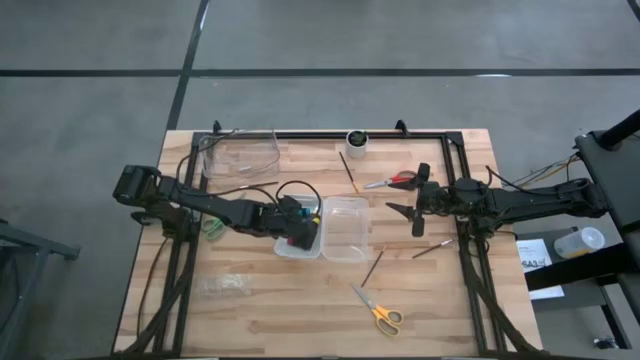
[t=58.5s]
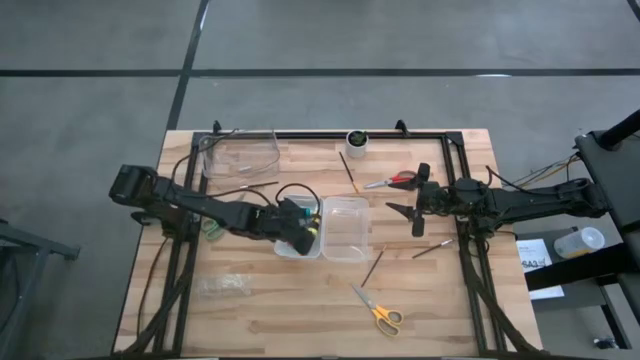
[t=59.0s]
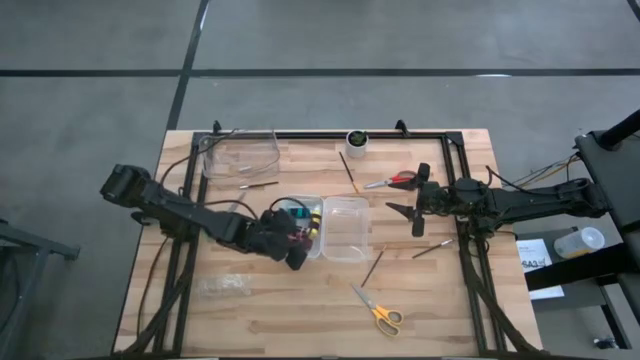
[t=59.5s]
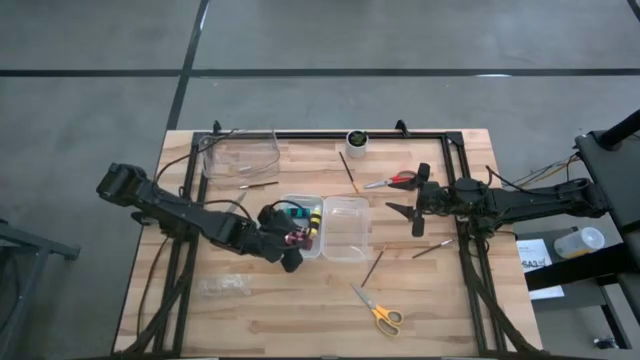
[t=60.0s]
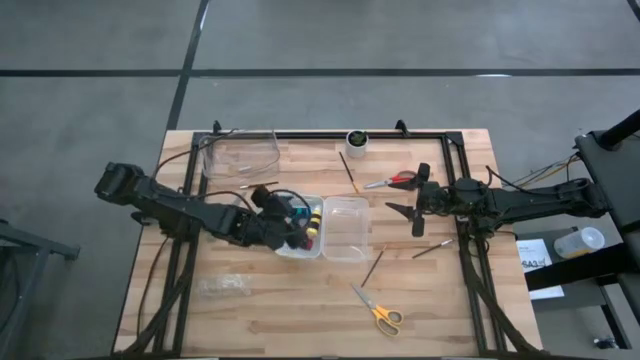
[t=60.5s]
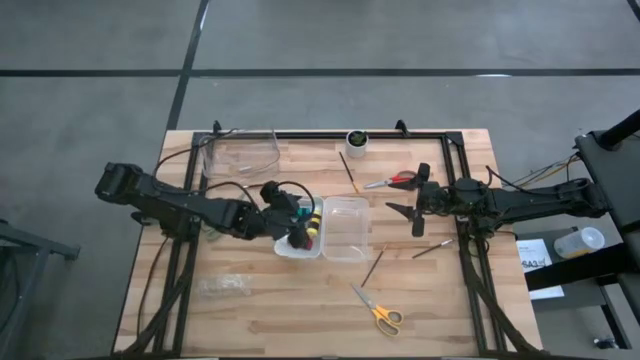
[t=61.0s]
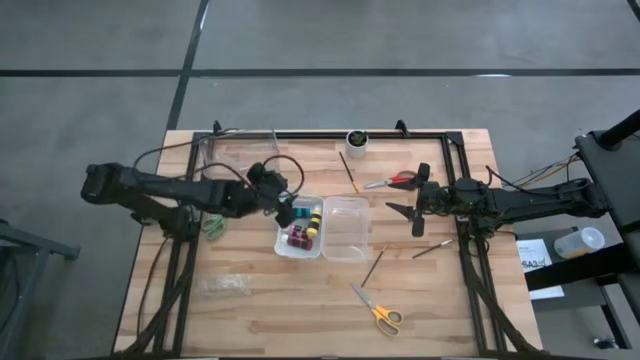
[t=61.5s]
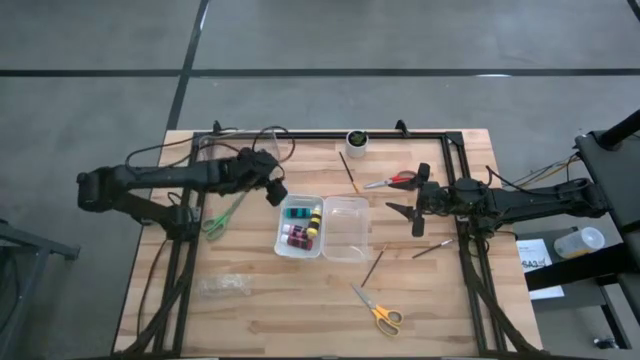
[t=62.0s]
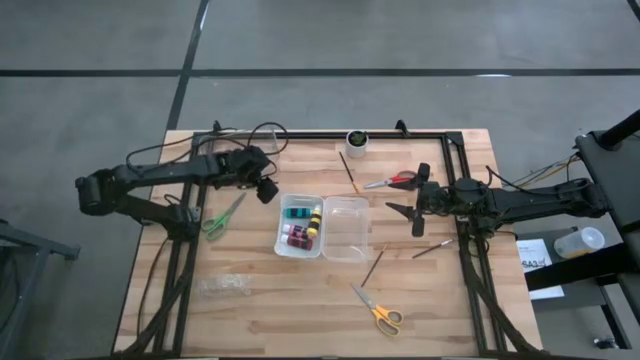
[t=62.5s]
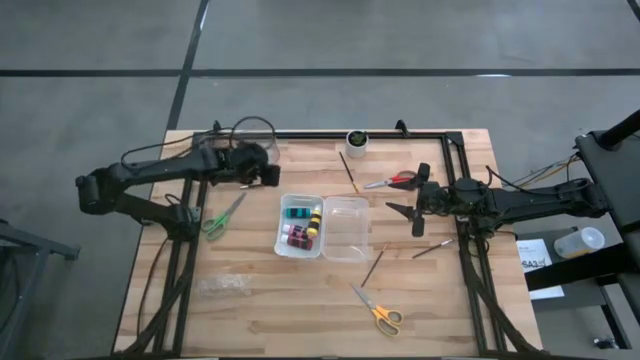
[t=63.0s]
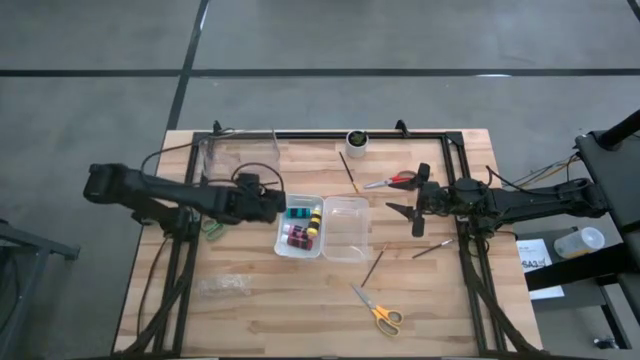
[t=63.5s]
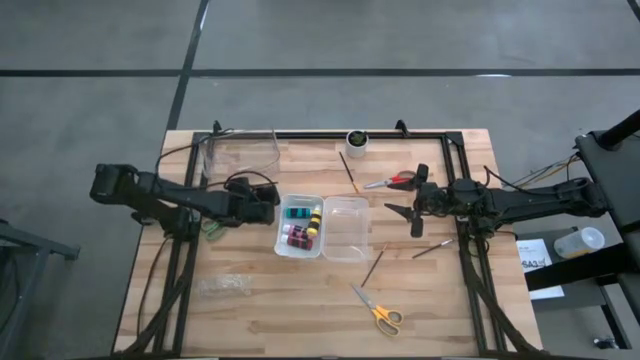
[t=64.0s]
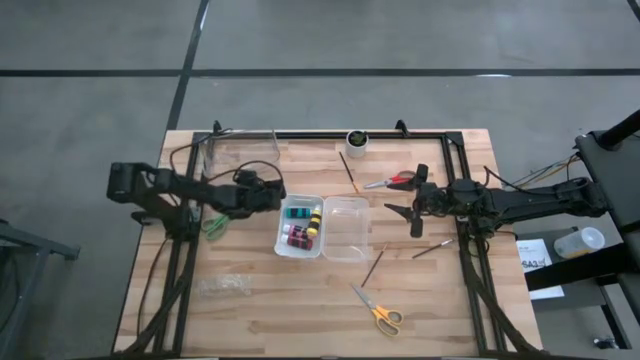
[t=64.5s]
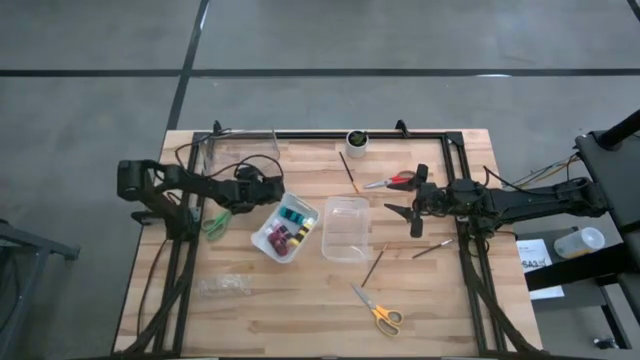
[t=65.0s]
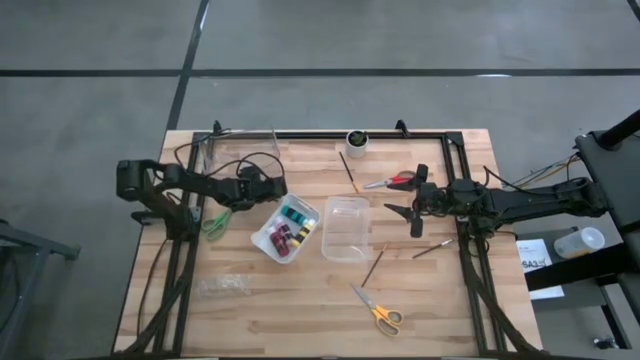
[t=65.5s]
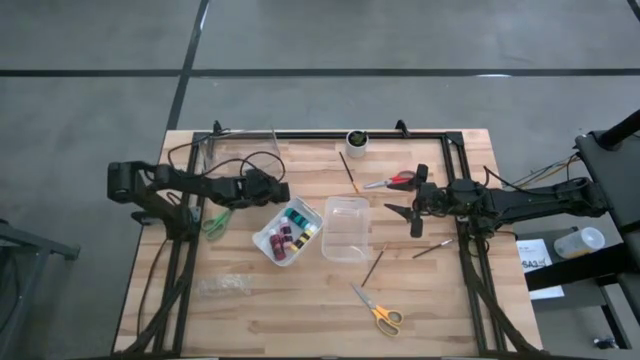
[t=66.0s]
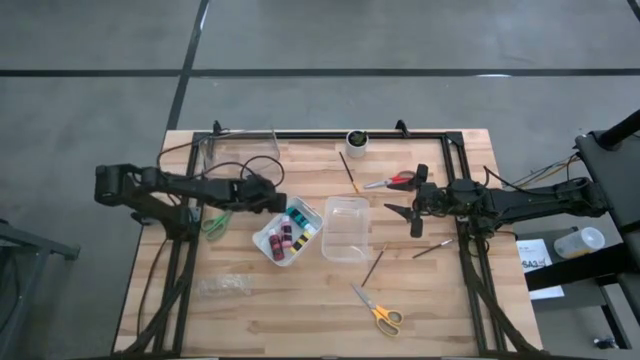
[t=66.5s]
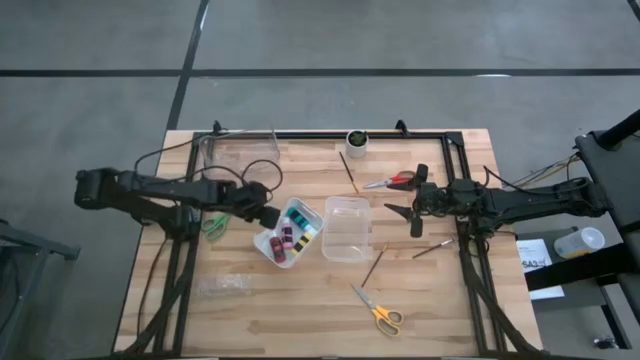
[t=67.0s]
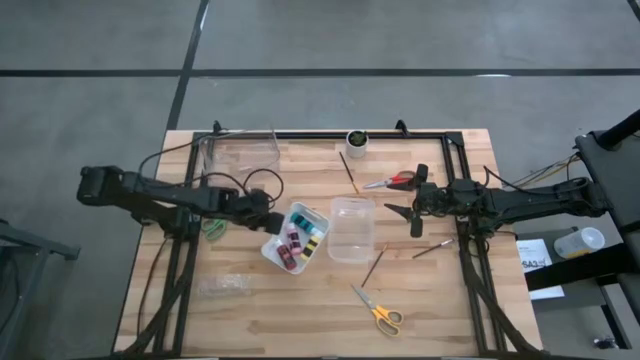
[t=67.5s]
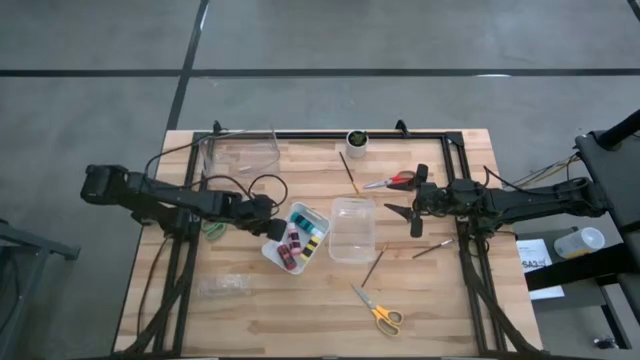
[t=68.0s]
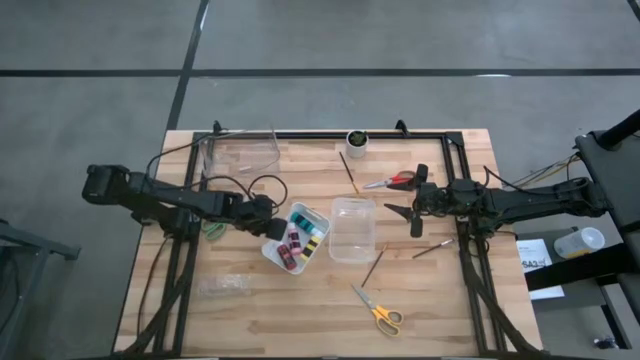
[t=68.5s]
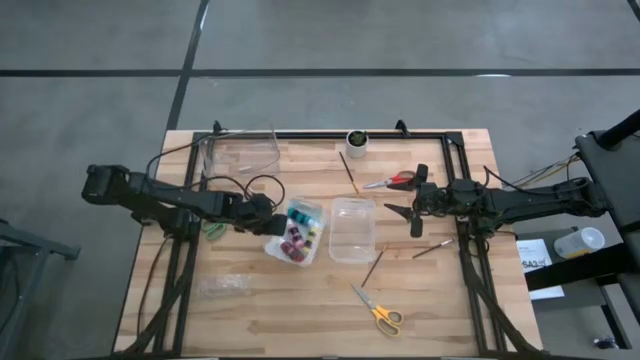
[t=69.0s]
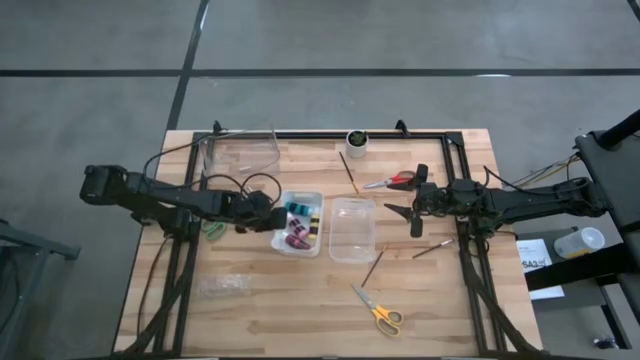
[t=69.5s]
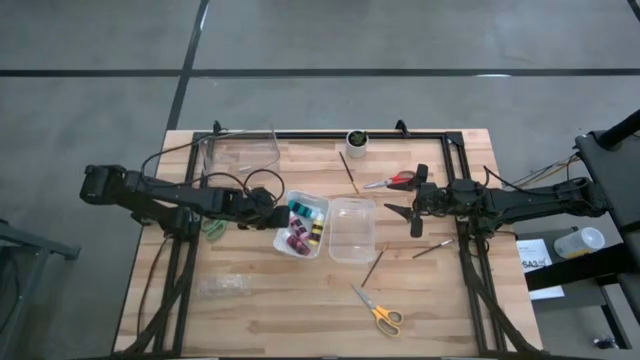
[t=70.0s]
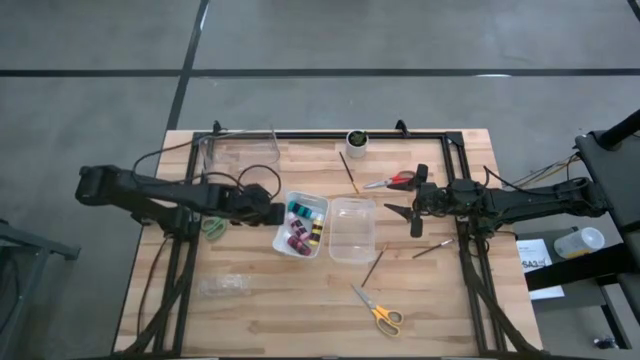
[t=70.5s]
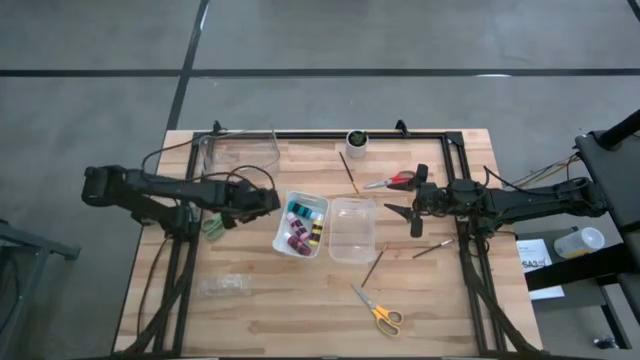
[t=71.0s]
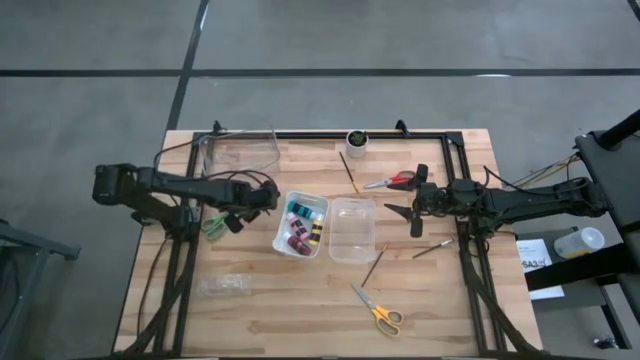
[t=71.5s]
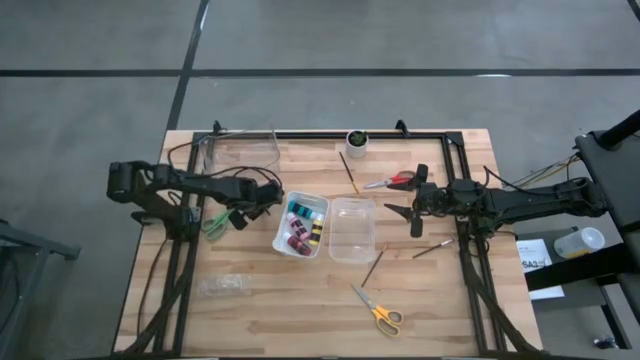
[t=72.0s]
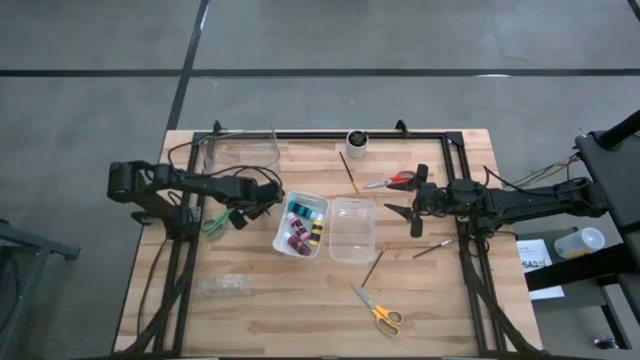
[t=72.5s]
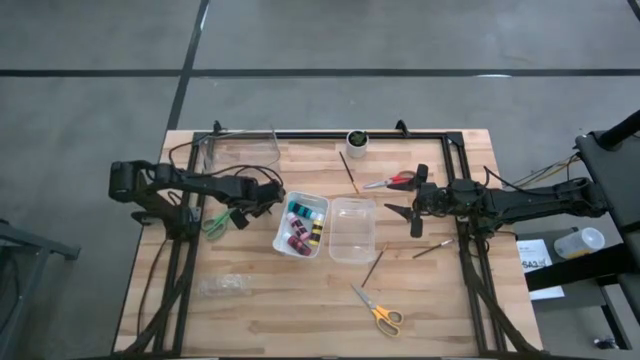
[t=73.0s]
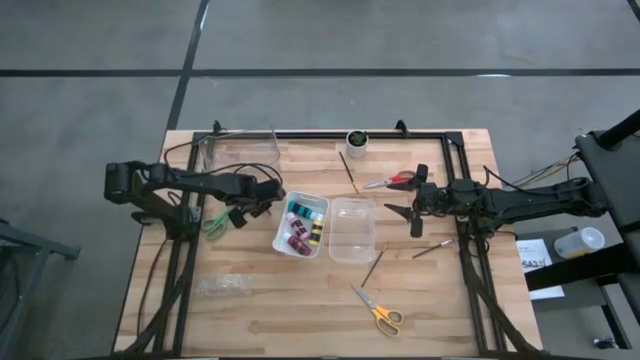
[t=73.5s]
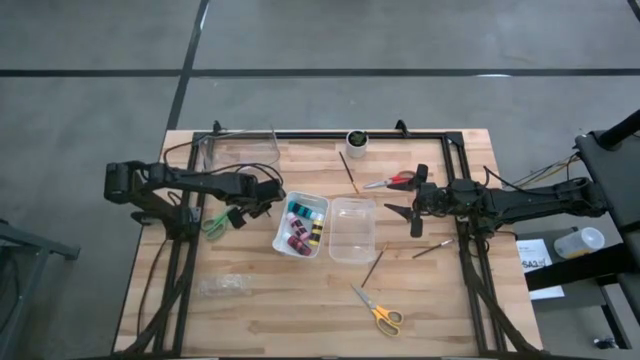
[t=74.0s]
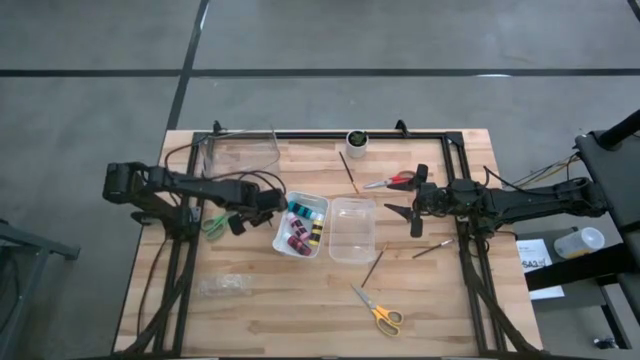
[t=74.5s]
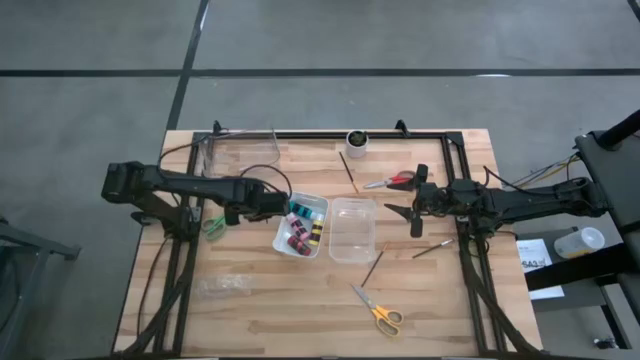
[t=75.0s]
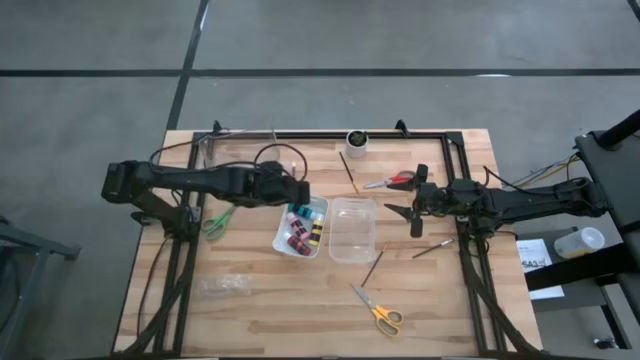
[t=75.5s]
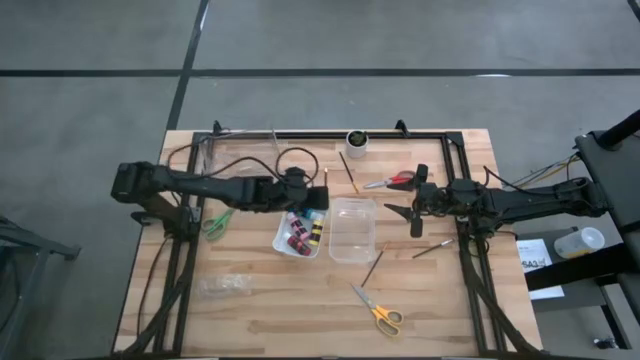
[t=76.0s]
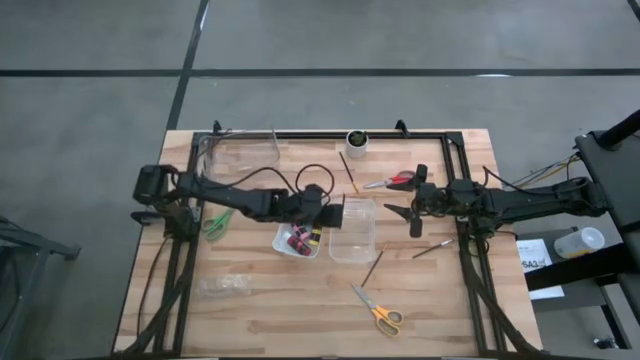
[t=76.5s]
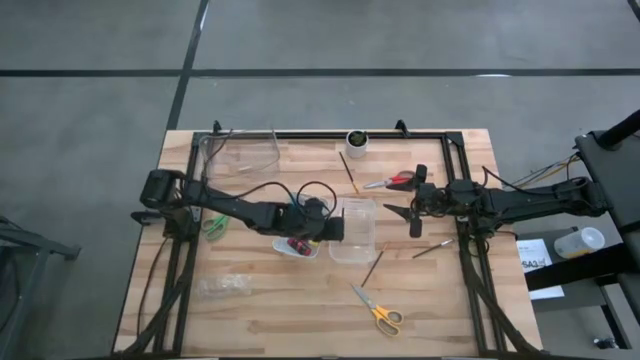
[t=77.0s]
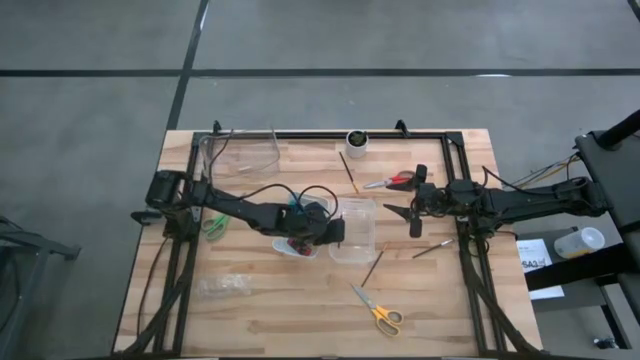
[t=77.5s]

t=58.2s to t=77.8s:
Task: Pick & Place Paint Supplies
Put the silver paint brush into the bottom transparent bin

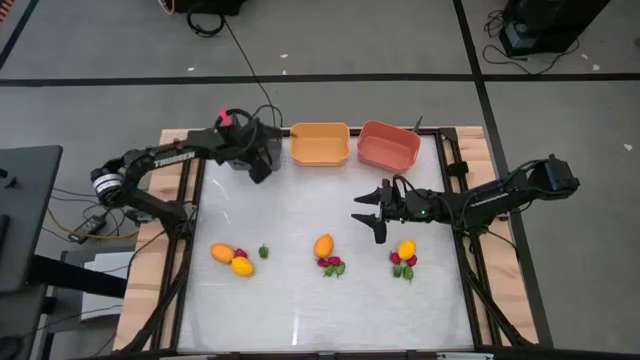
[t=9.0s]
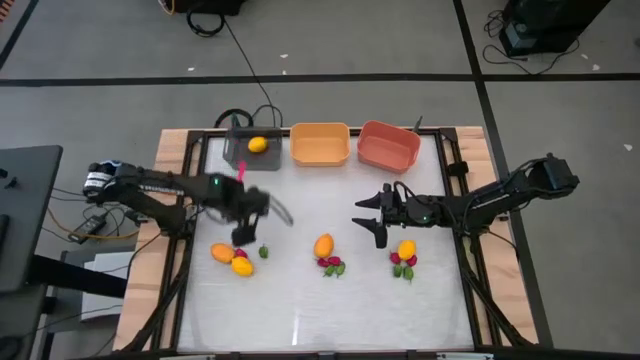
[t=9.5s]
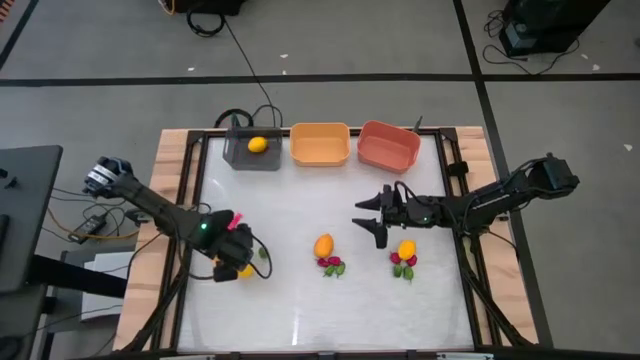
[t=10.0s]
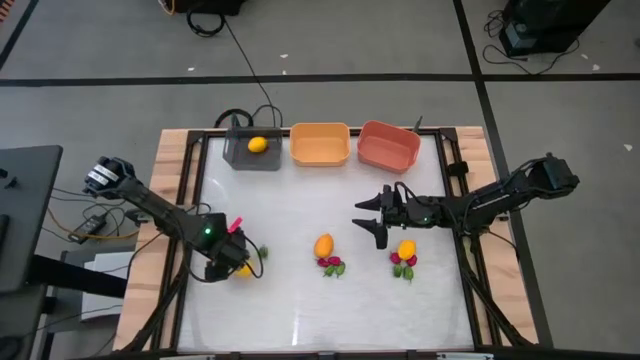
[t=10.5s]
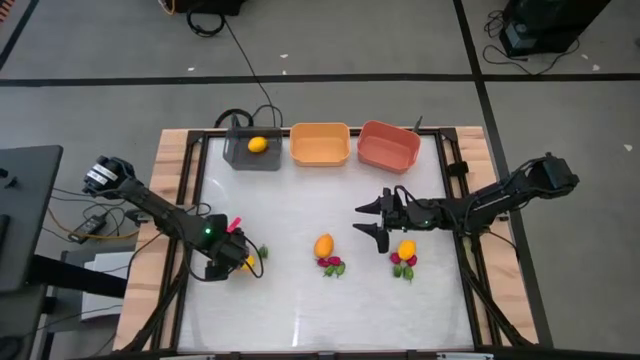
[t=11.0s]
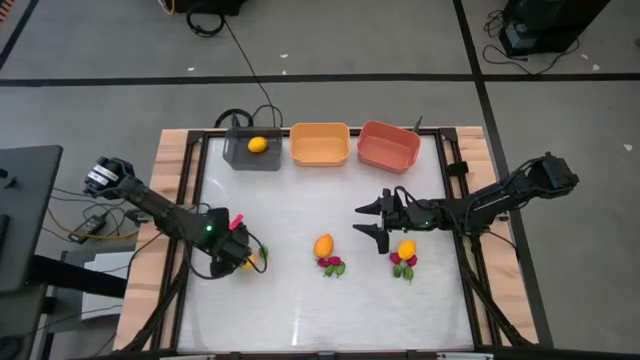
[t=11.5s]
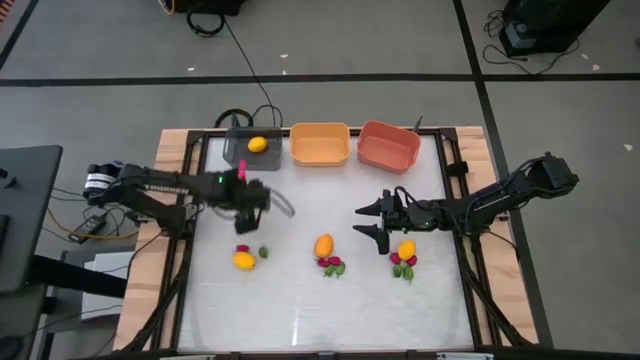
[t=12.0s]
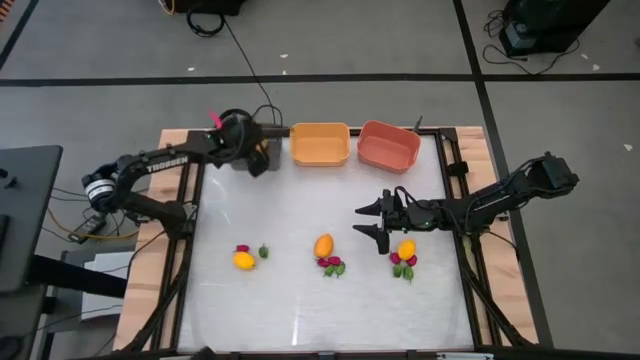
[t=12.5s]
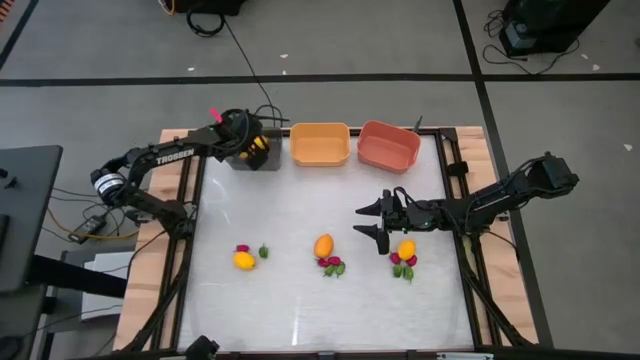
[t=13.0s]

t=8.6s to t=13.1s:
Task: Sort produce into baskets
Put the lemon into the black bin
